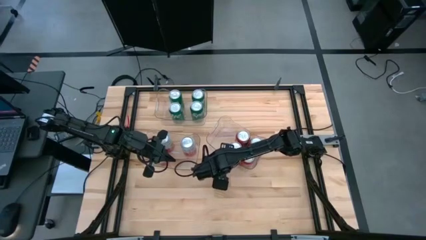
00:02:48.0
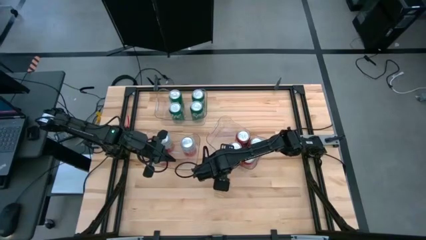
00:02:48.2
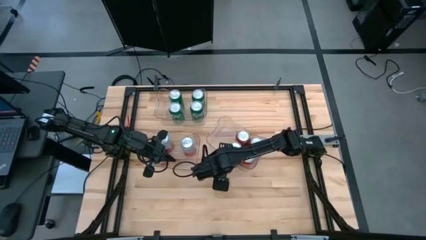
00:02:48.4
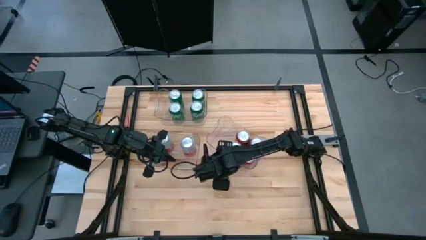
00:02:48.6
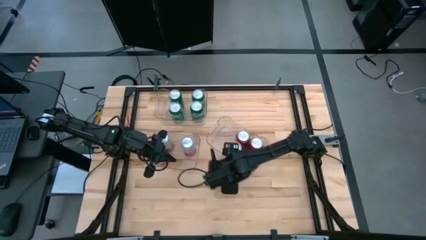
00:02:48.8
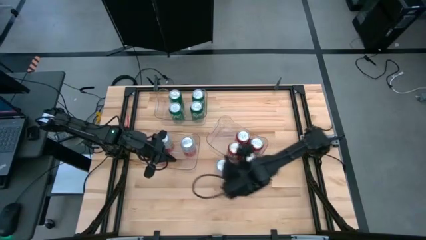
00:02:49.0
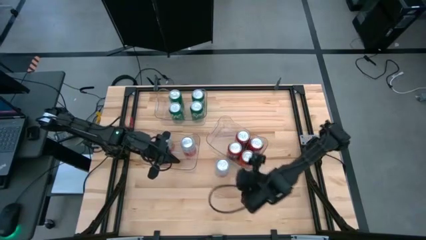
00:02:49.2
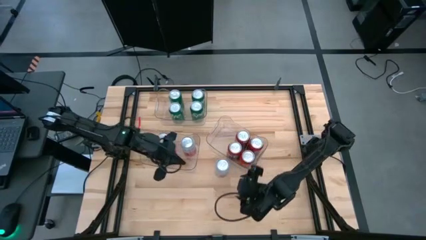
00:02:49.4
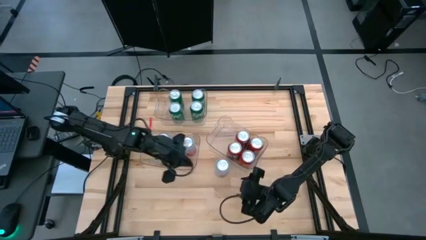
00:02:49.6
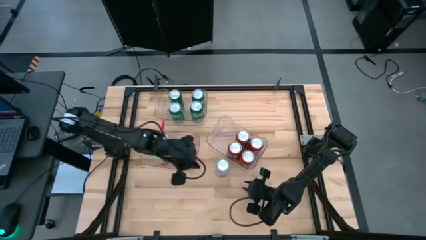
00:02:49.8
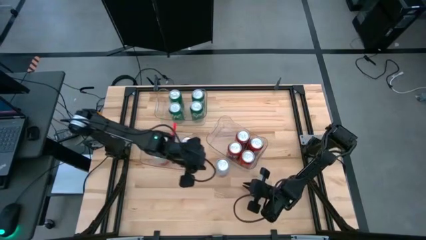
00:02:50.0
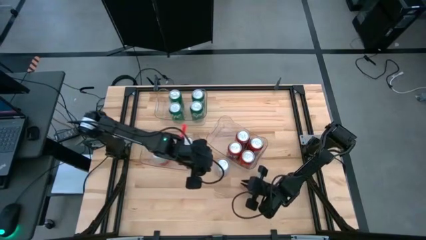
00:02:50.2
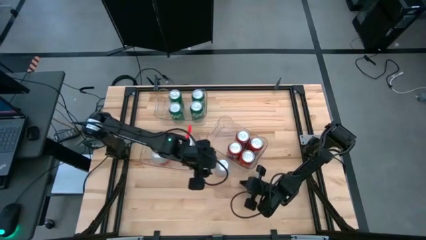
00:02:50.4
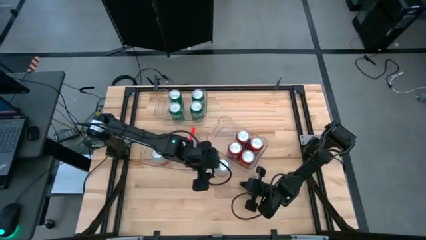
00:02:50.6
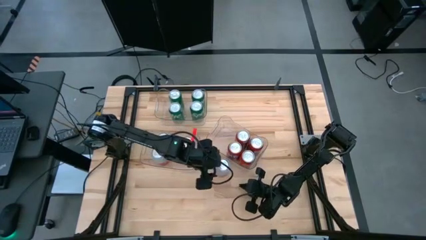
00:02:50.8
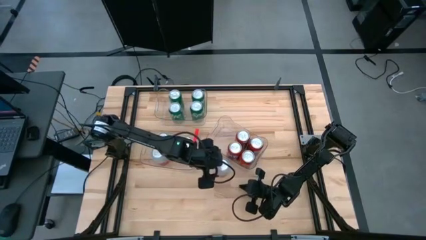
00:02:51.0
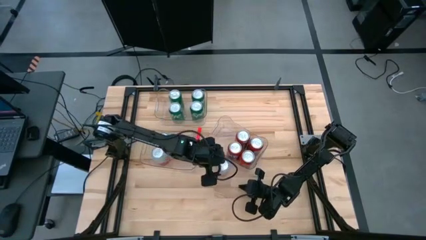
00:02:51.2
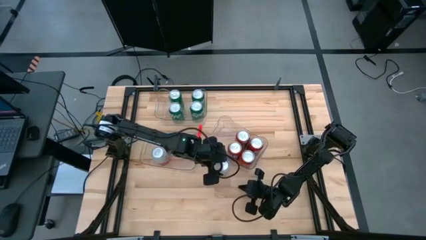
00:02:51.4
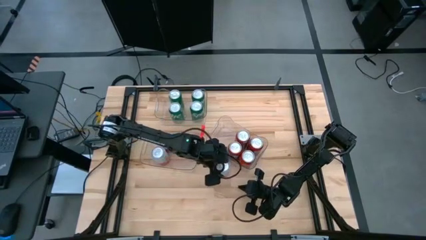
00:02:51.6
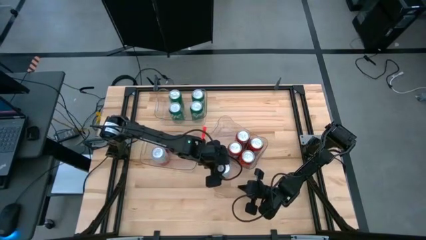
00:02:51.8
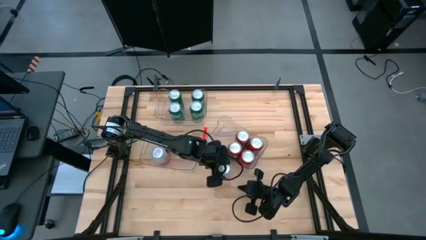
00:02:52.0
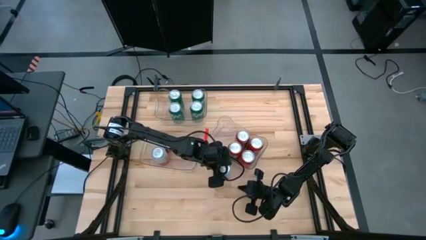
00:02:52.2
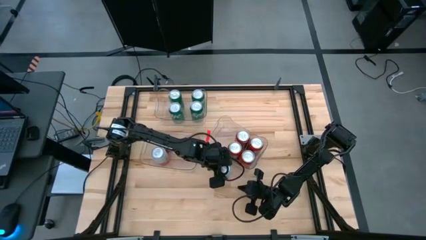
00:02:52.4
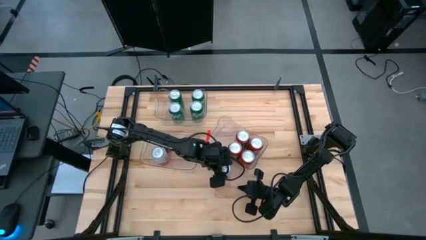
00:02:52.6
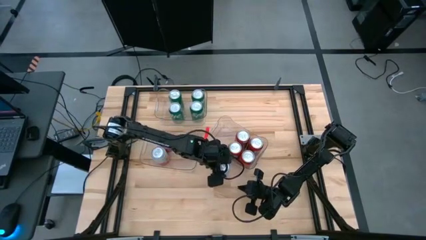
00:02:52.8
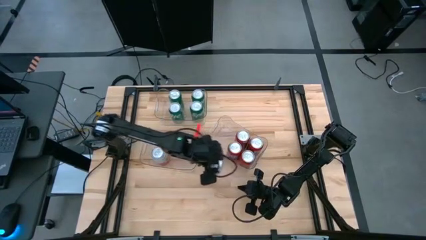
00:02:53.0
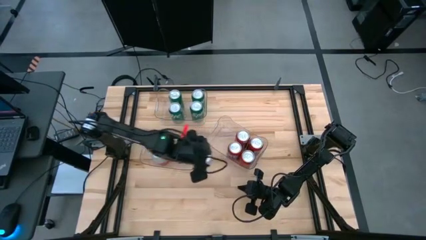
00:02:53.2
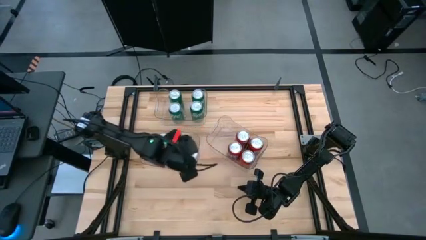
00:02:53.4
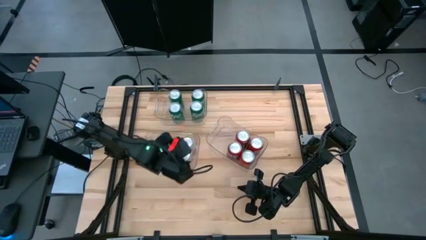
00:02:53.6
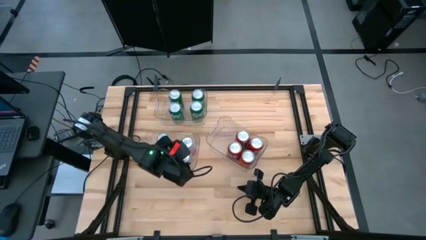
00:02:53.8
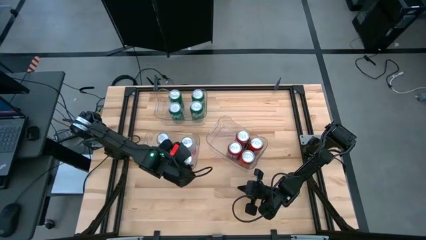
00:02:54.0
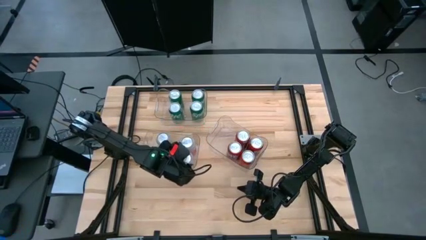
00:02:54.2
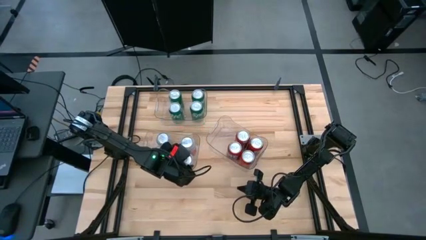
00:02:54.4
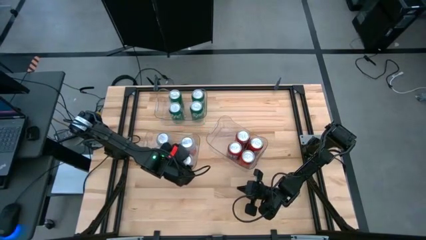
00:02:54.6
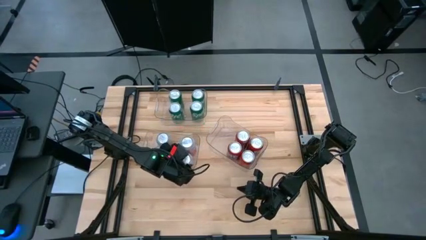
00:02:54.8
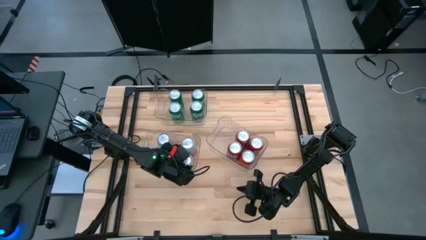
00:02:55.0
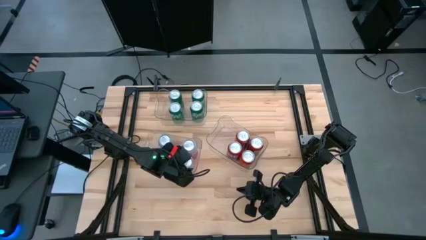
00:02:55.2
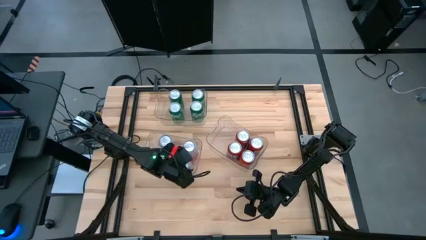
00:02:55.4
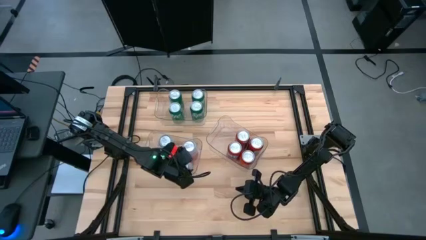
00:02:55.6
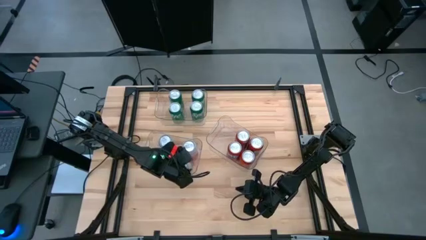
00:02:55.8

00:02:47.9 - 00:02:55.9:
Task: Sort soda cans
Put the pink white soda can into the bottom left transparent bin

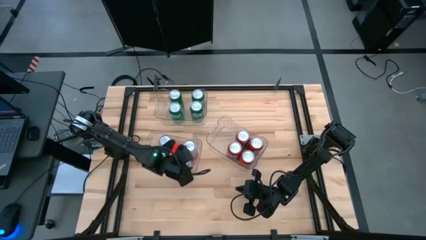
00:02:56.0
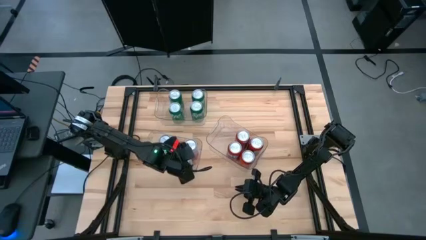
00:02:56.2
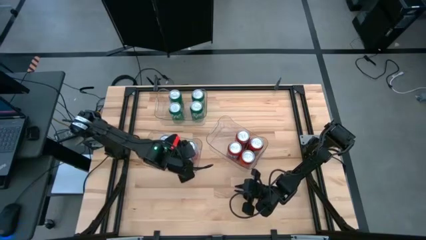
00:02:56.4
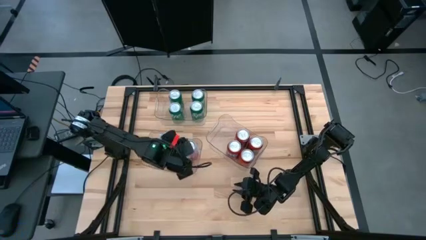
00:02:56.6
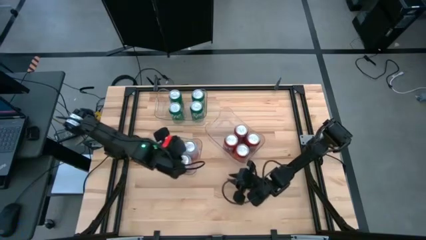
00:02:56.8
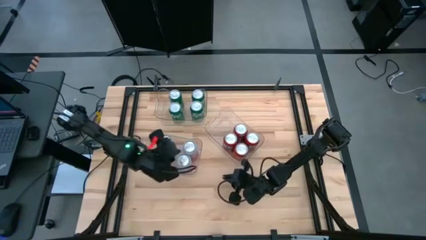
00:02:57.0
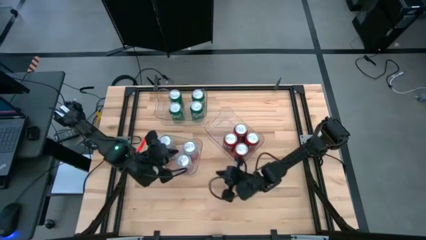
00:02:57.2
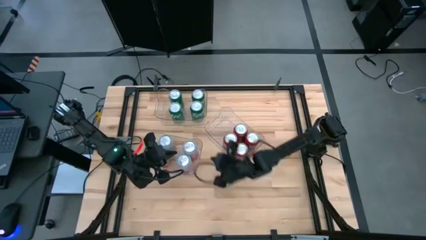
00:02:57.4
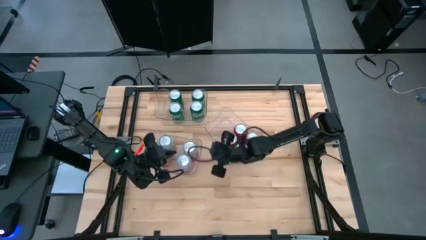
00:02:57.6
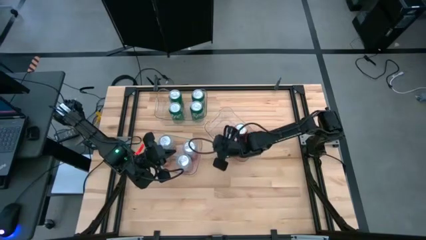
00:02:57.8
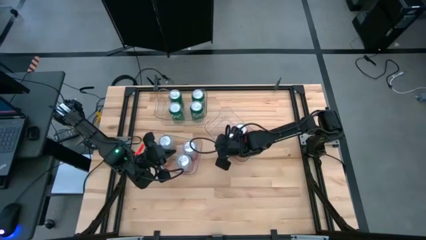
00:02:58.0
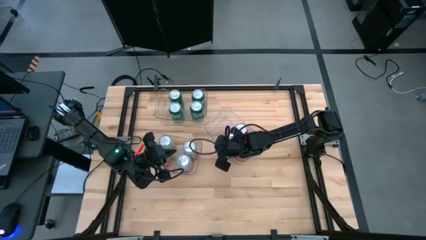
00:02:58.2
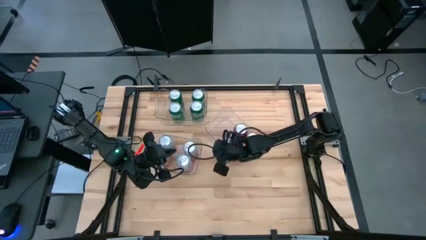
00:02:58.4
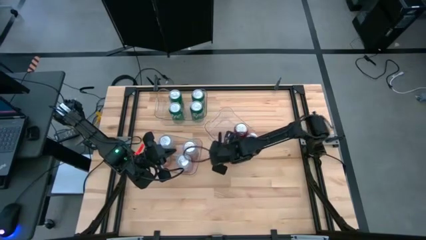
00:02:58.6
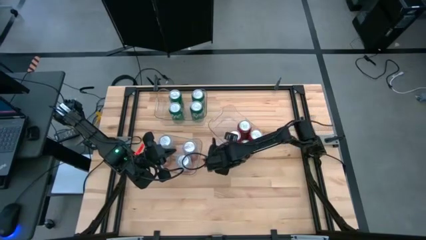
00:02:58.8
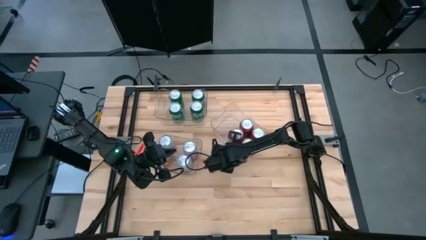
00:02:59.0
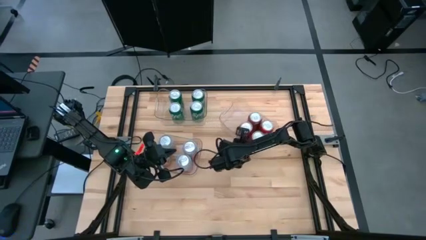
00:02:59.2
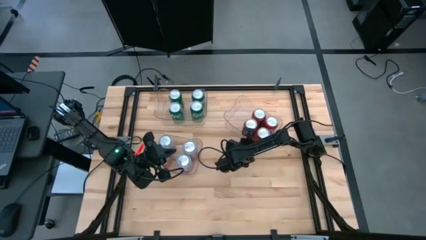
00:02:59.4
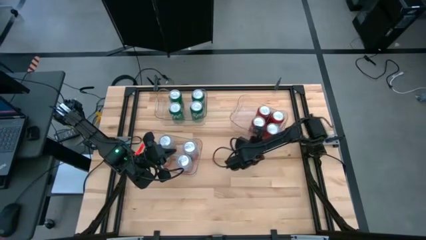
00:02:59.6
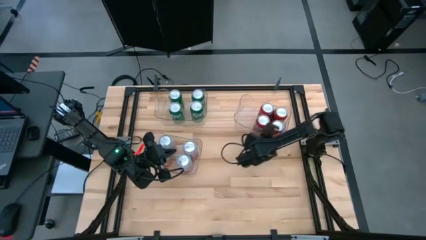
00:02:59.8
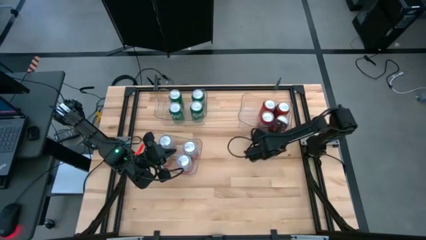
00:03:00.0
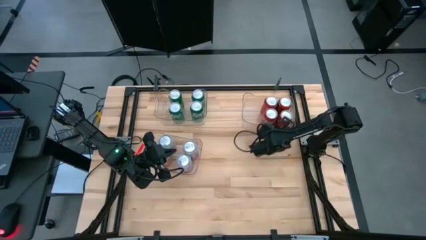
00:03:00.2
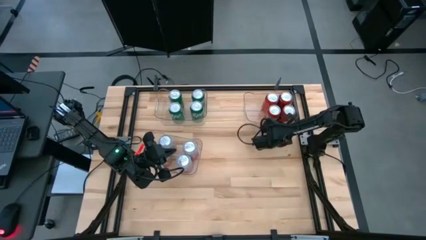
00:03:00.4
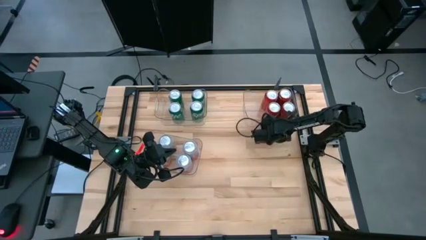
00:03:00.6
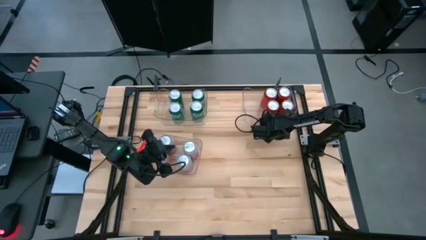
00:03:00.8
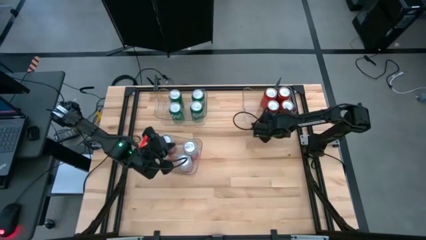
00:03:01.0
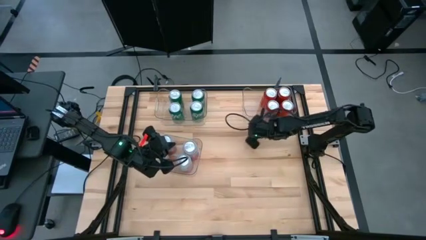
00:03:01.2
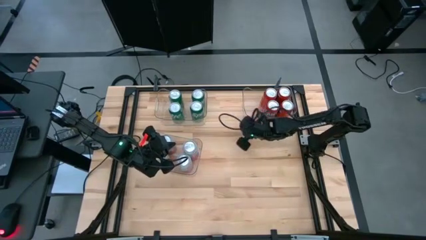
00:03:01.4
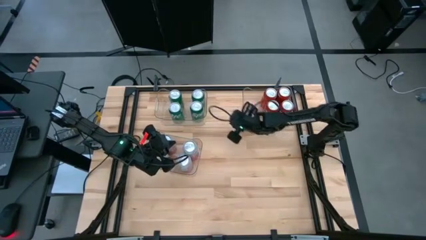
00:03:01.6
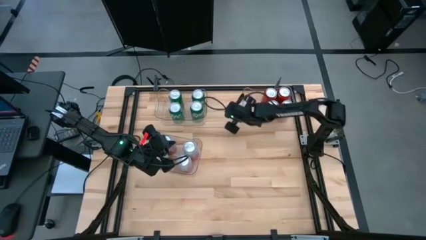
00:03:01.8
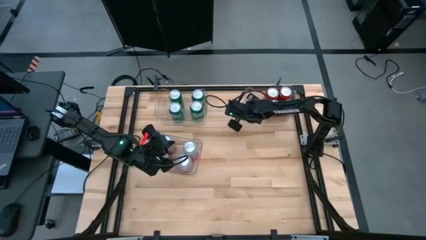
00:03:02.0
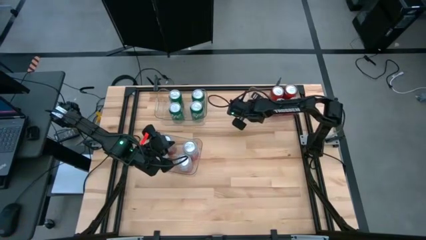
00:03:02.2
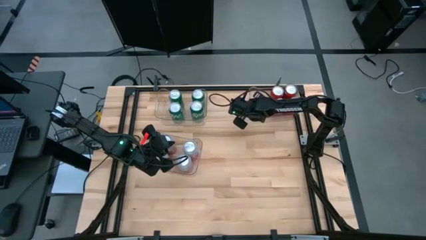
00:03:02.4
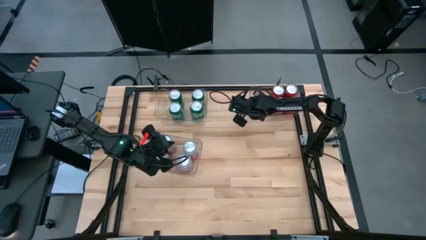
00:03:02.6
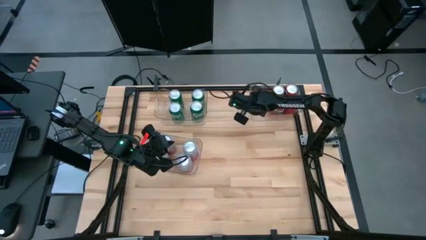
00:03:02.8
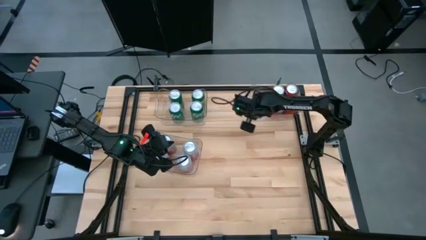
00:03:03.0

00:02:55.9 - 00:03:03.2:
Adjust the transparent bin from center to the top right
